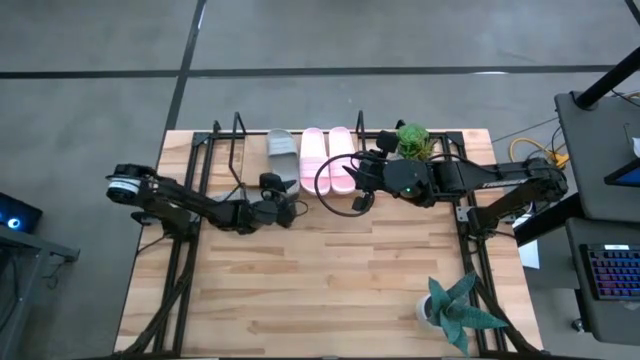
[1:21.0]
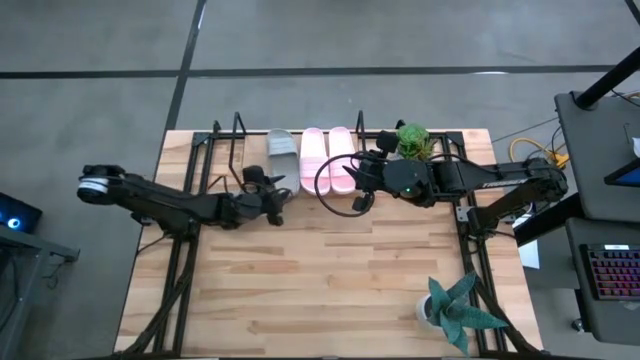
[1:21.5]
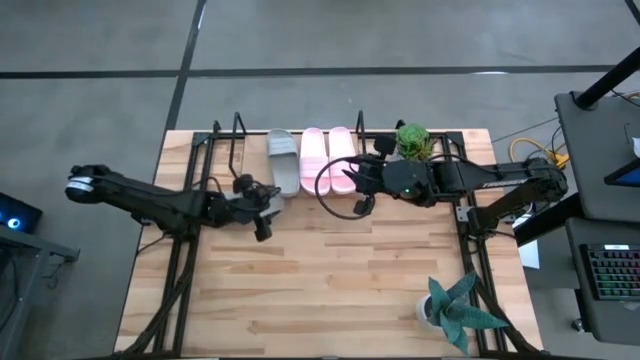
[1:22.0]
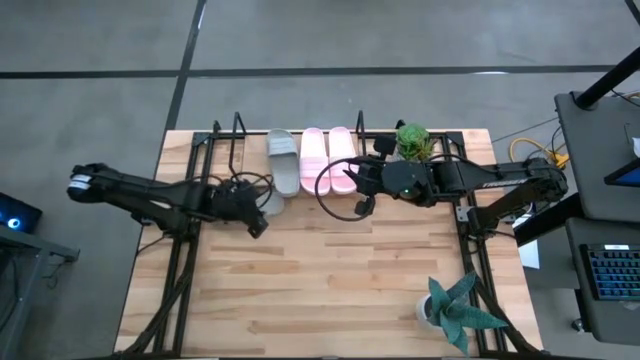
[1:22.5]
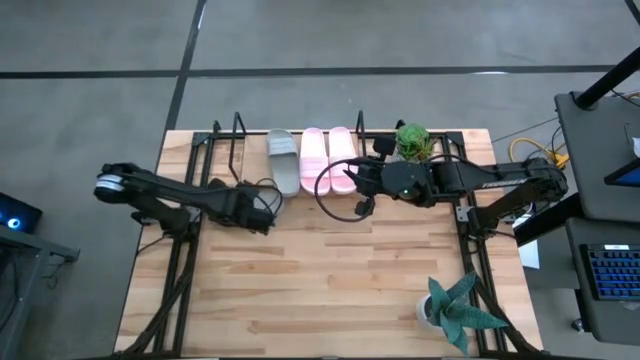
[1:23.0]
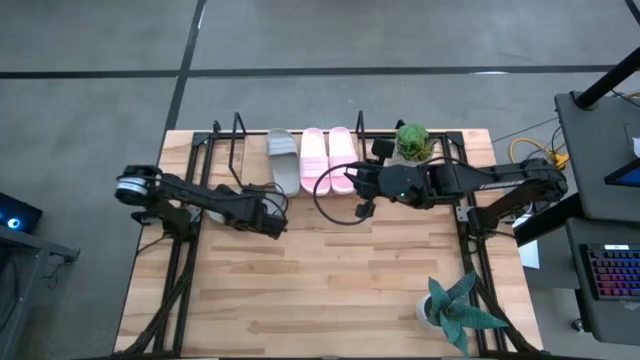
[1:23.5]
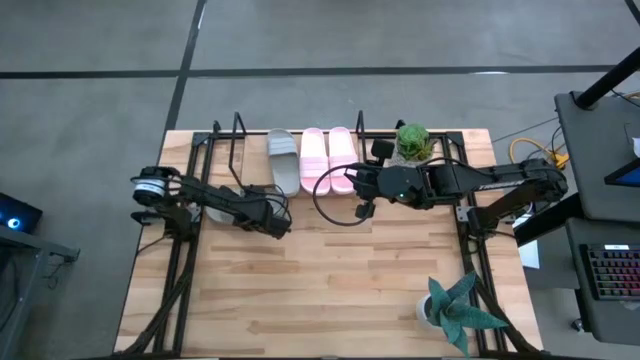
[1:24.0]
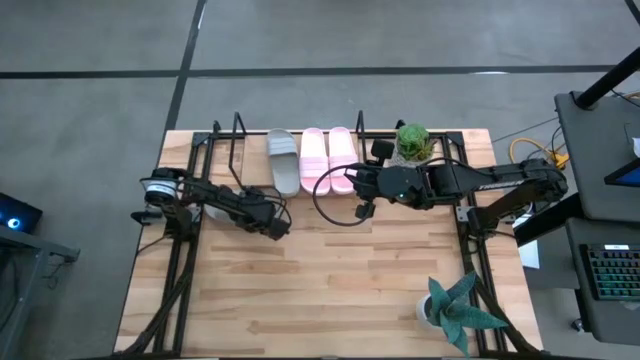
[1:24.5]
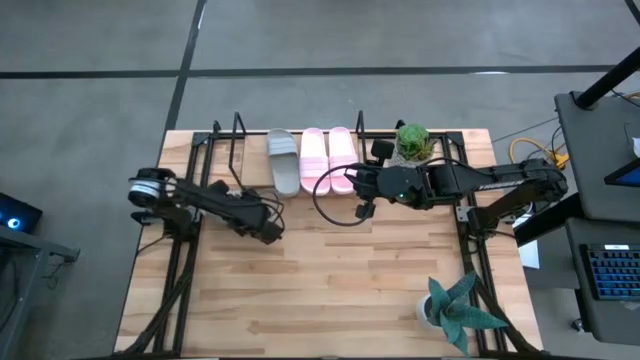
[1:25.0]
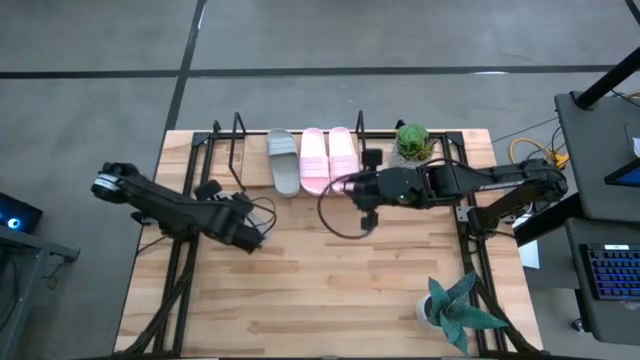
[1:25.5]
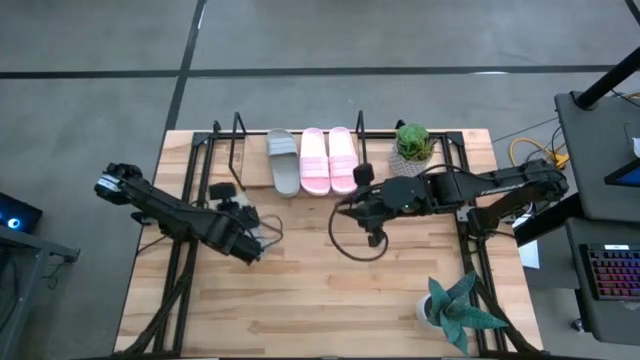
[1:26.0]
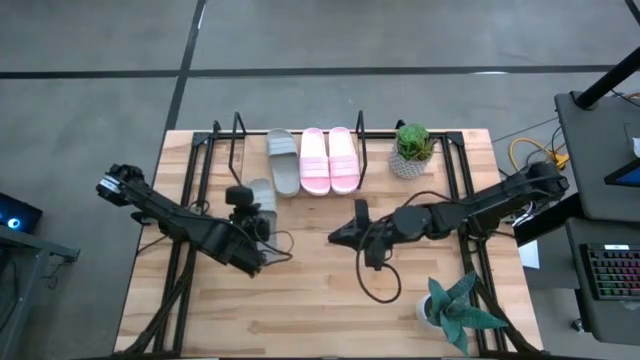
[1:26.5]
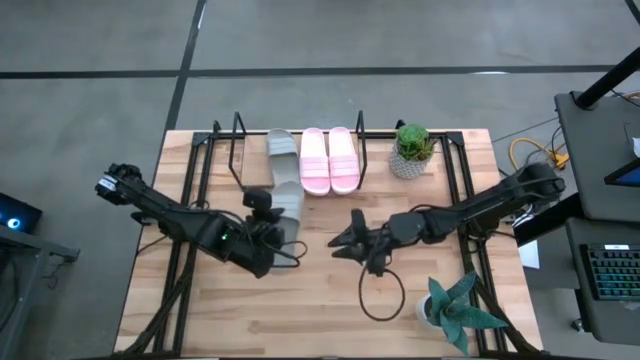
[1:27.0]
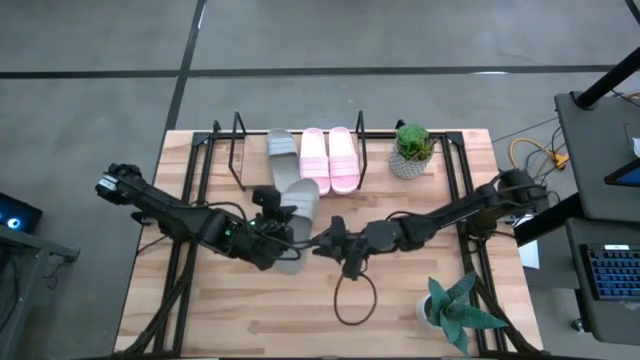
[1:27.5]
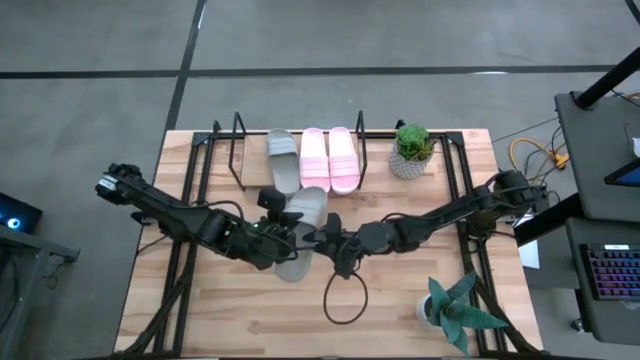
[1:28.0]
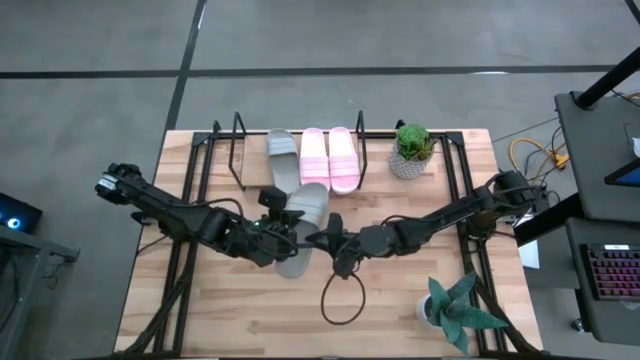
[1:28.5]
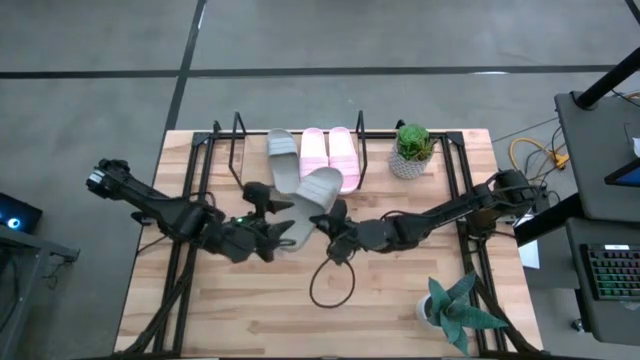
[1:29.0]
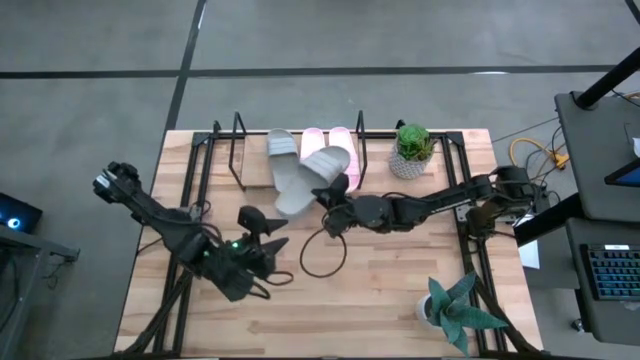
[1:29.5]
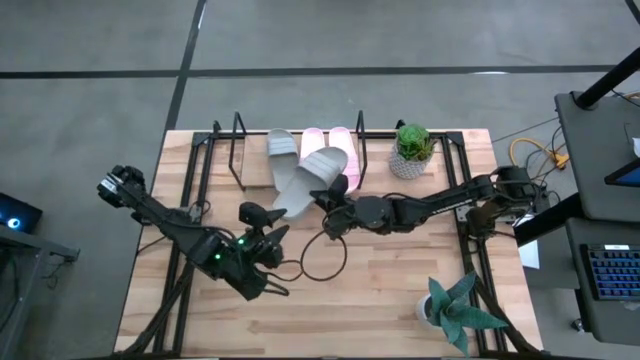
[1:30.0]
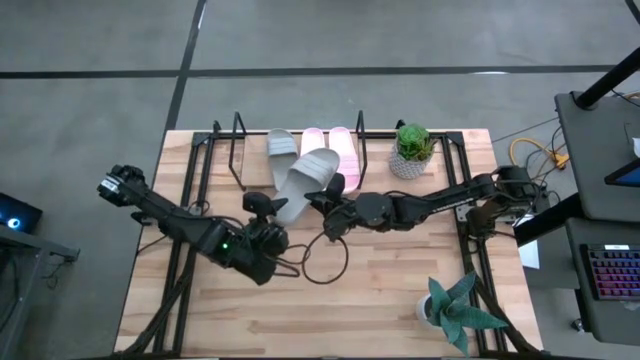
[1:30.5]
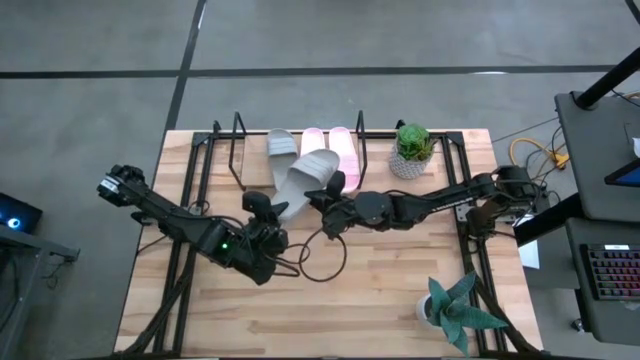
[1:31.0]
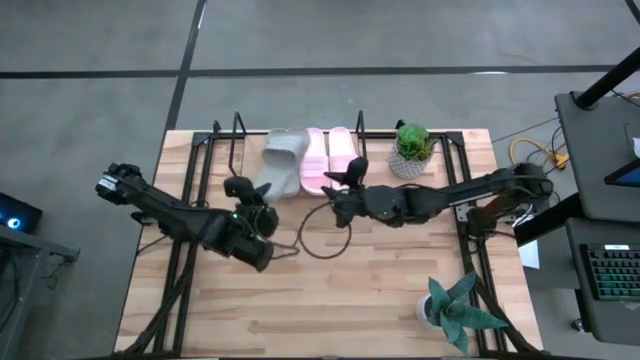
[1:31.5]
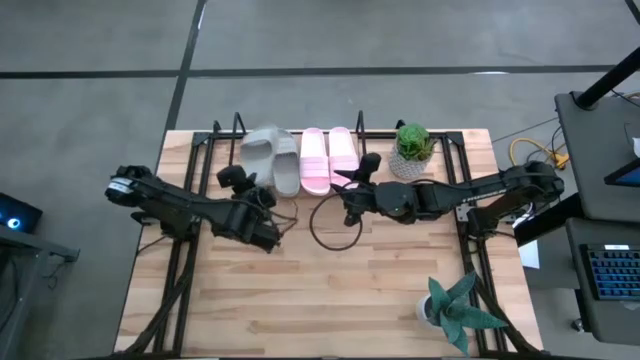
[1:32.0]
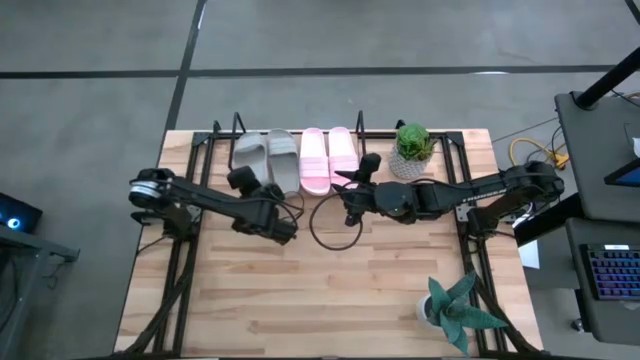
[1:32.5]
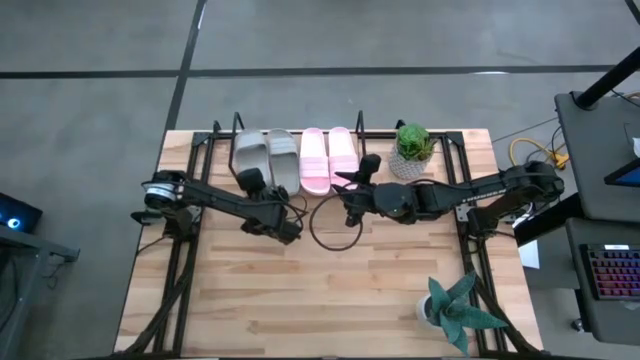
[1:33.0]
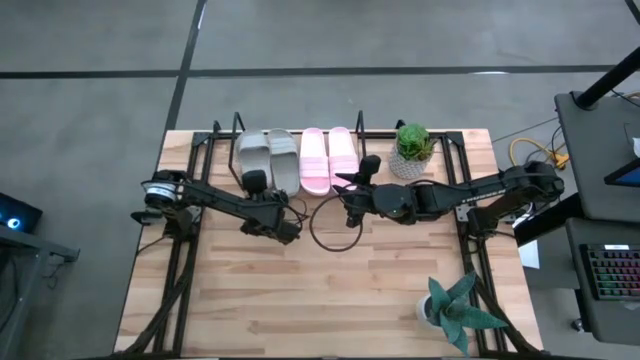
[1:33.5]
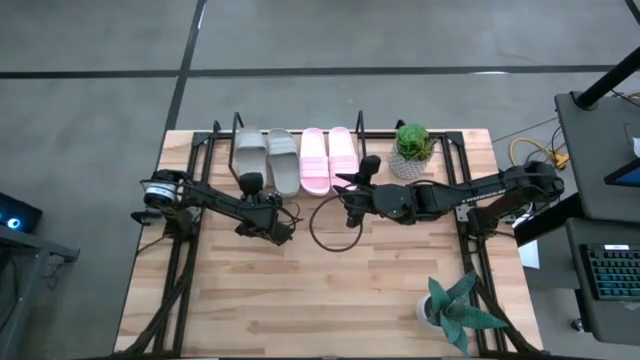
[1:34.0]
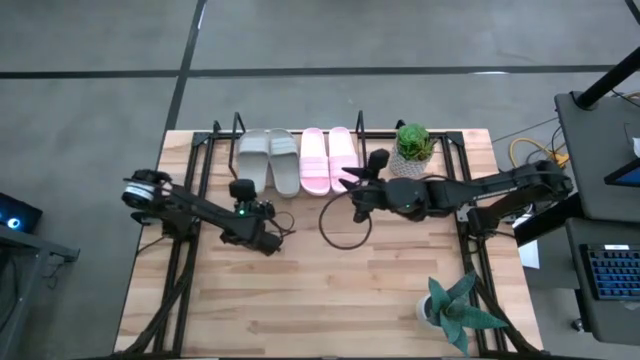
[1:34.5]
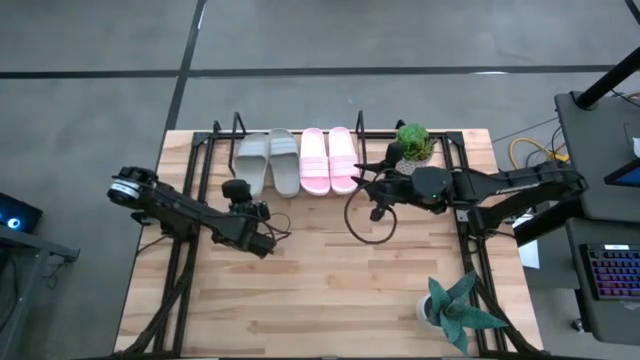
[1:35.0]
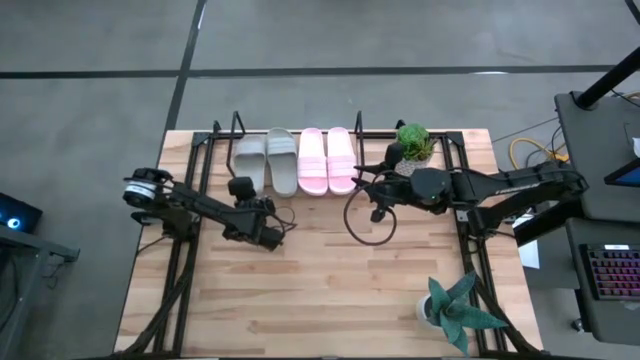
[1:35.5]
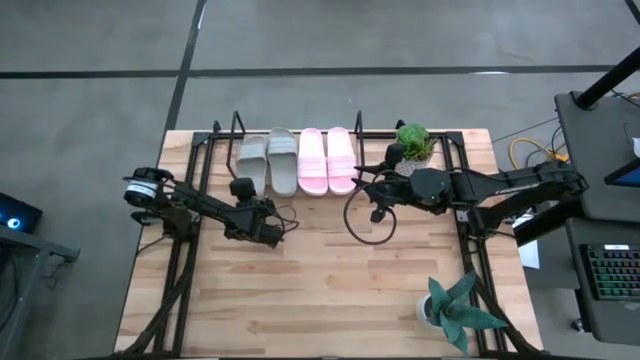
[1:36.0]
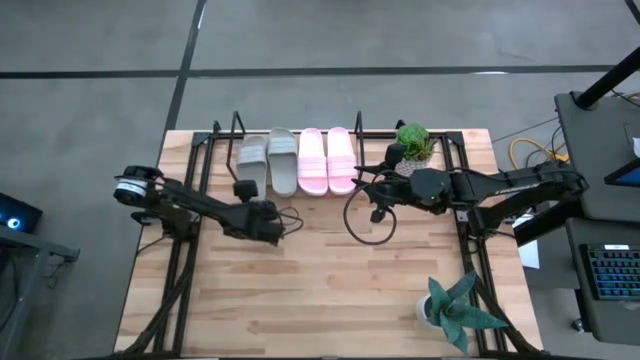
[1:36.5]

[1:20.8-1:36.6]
Task: Pick and place slides into the shelf
Put the gray slide on the shelf

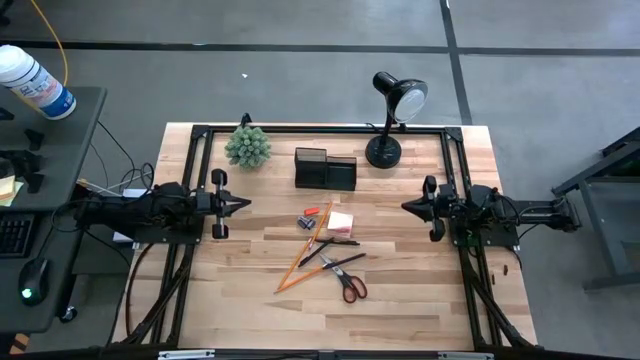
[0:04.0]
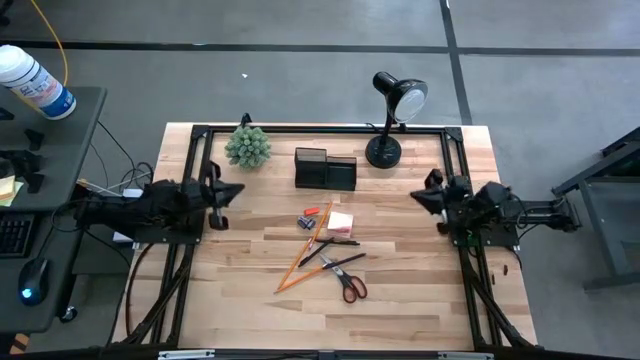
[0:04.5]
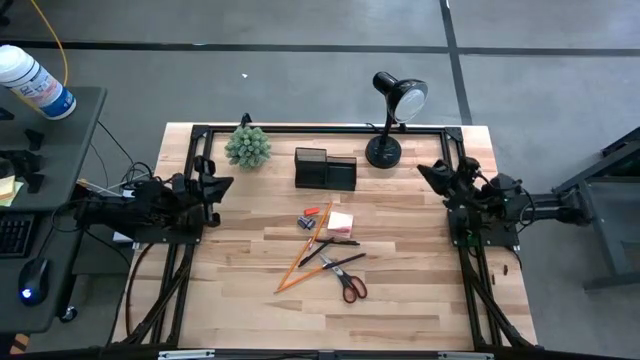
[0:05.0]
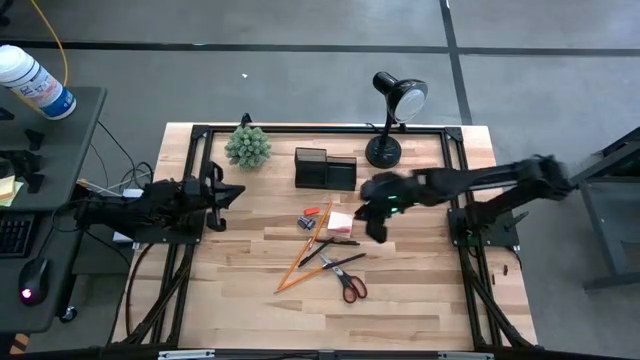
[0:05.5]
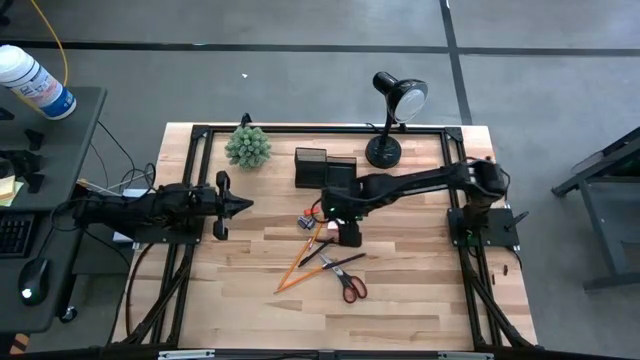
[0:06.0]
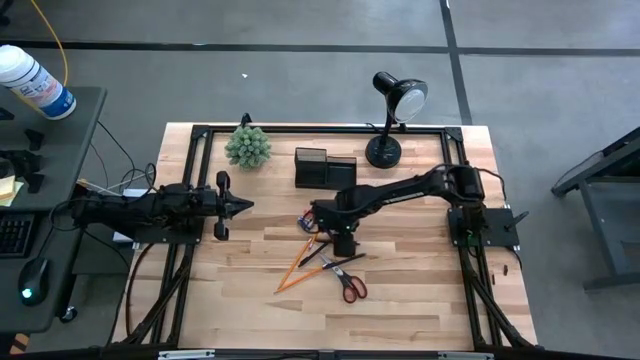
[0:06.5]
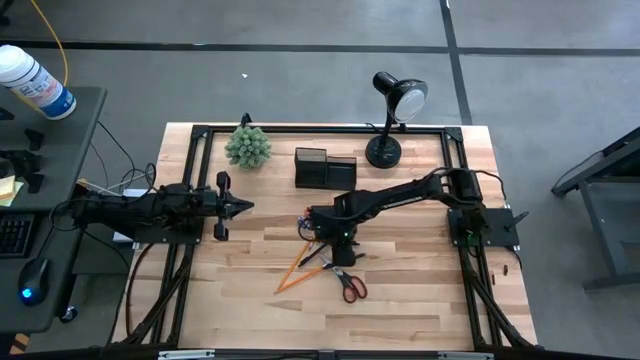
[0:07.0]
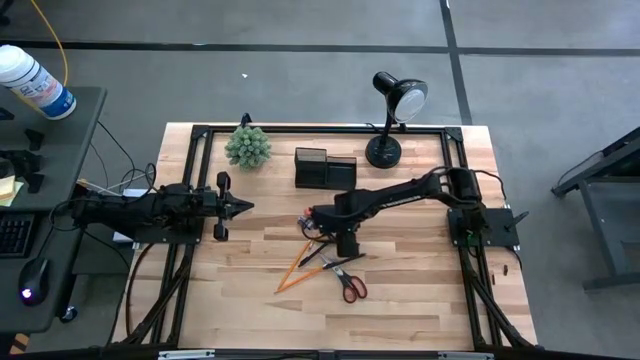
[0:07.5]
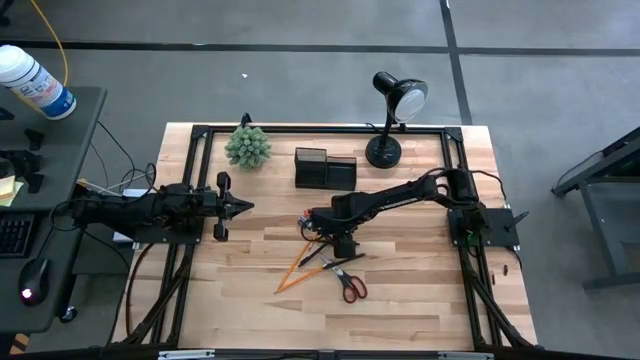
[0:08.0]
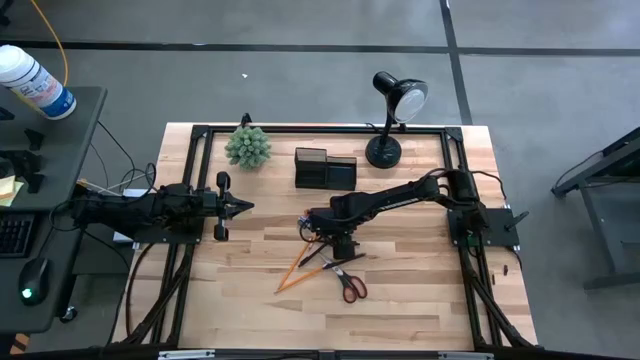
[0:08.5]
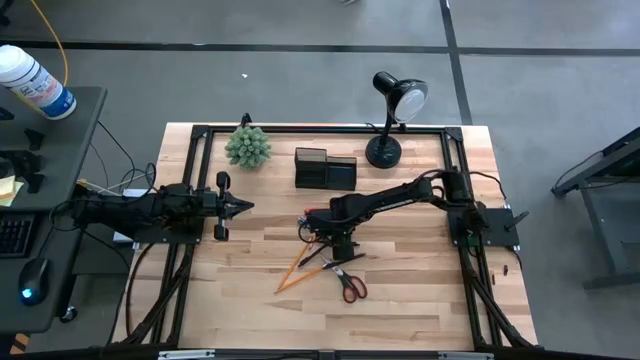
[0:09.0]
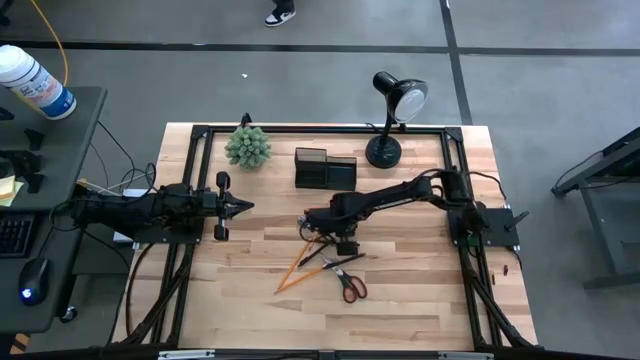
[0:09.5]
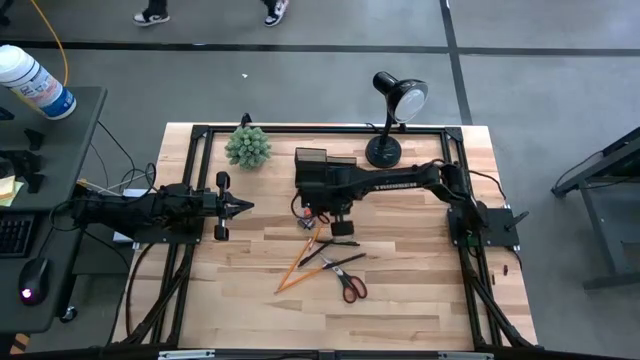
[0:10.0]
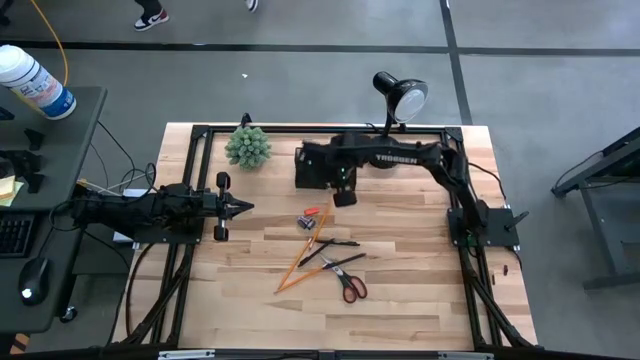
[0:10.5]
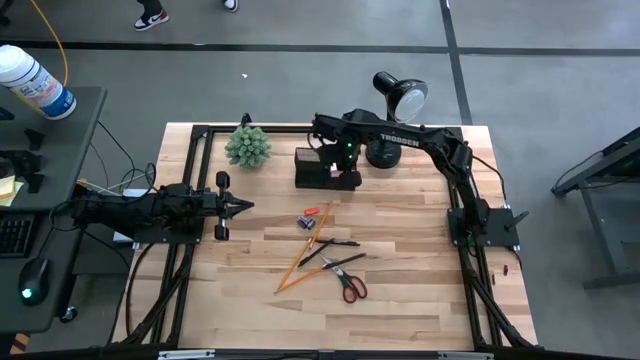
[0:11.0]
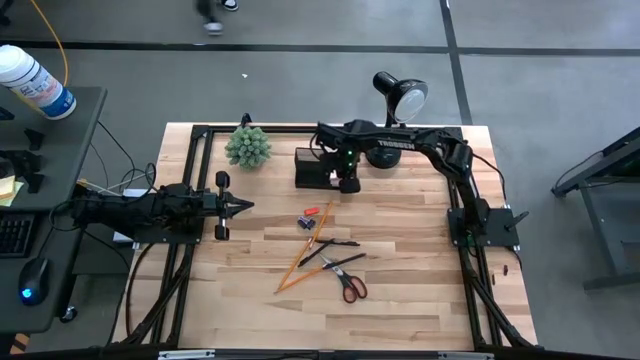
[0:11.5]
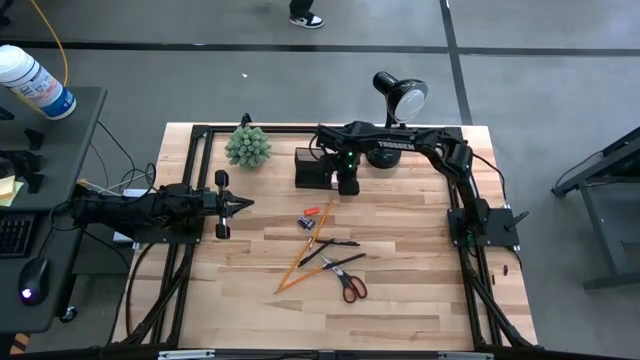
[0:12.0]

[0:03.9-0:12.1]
Task: Pick and place office supplies into organizer
Put the pink sticky notes into the desk organizer
